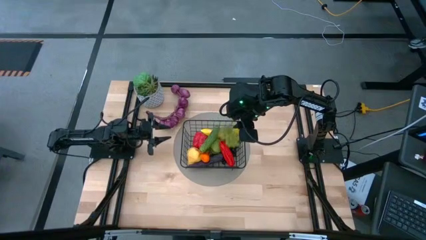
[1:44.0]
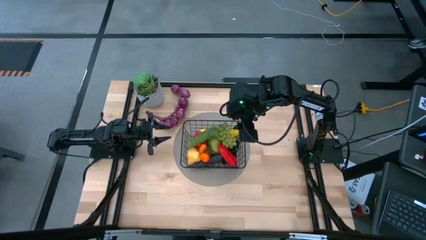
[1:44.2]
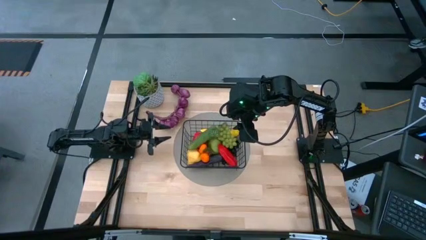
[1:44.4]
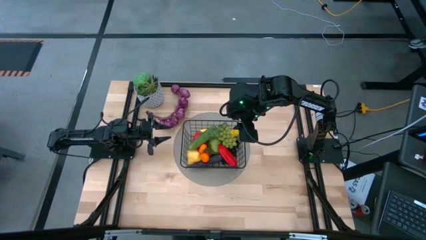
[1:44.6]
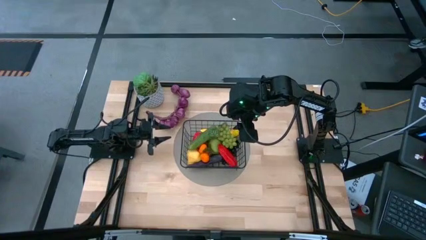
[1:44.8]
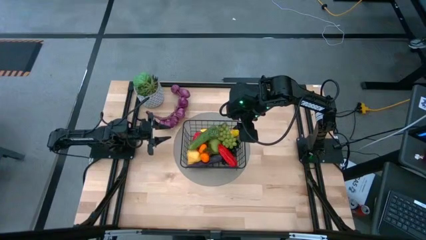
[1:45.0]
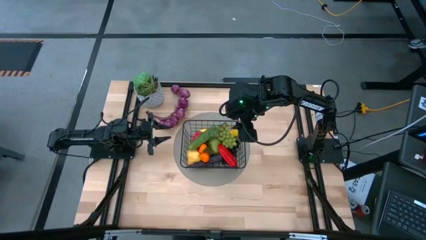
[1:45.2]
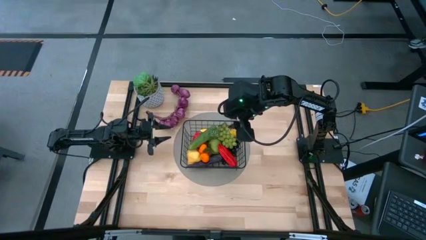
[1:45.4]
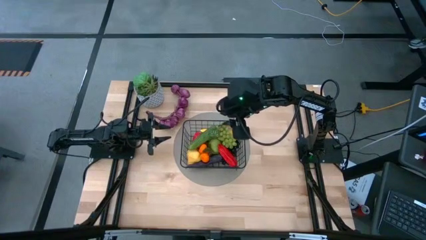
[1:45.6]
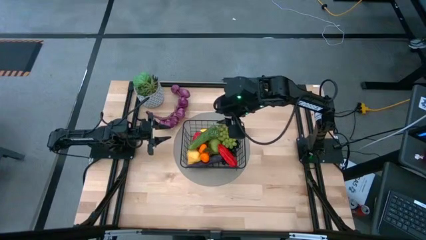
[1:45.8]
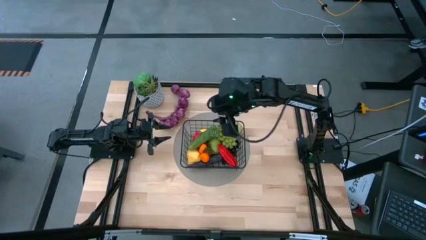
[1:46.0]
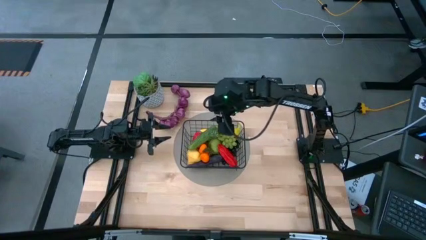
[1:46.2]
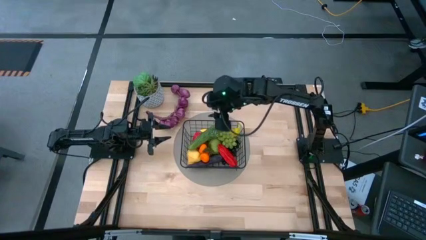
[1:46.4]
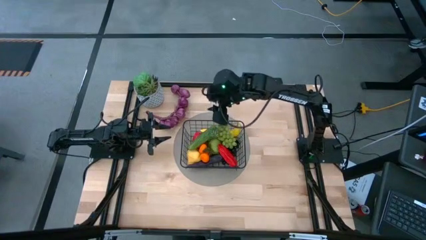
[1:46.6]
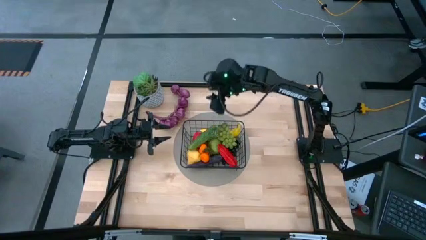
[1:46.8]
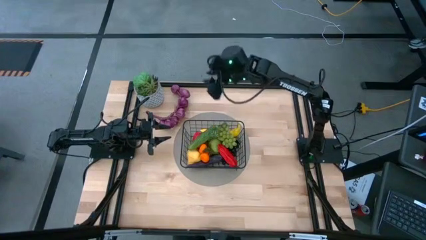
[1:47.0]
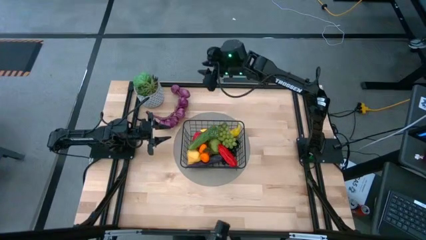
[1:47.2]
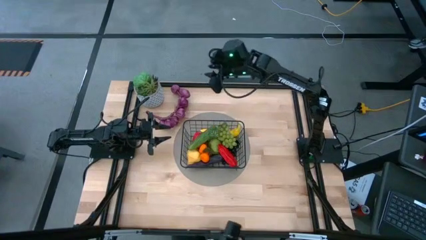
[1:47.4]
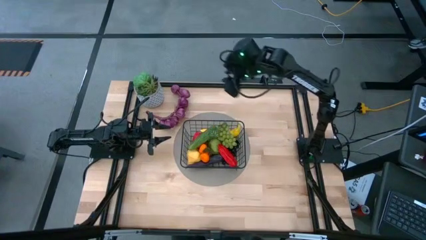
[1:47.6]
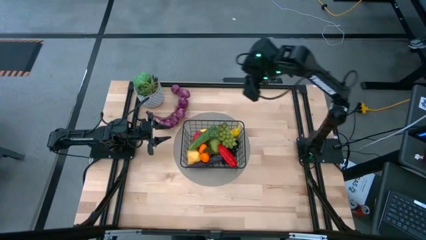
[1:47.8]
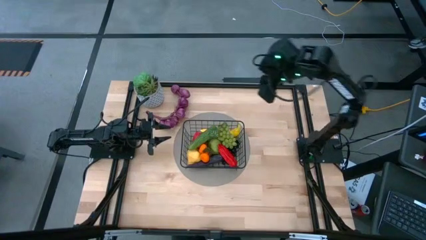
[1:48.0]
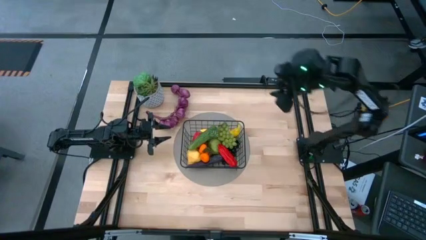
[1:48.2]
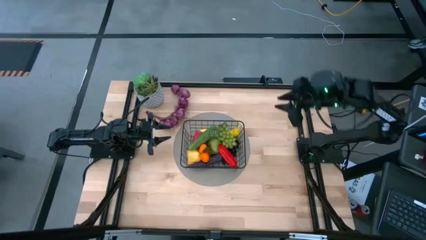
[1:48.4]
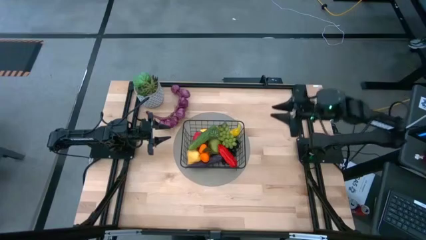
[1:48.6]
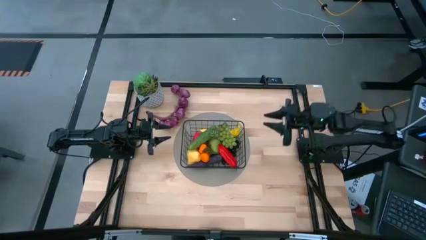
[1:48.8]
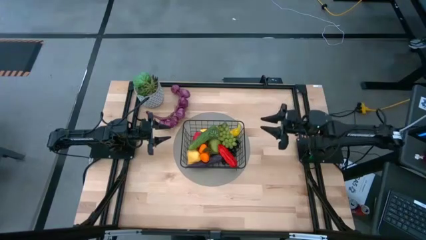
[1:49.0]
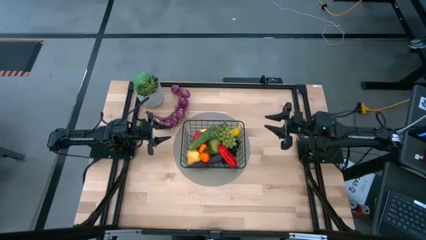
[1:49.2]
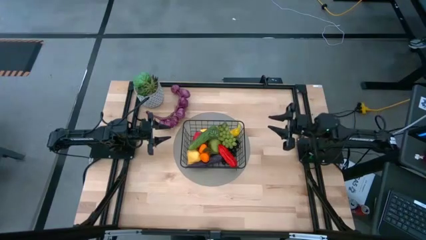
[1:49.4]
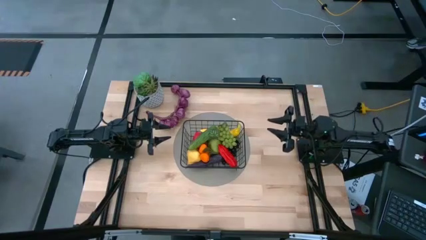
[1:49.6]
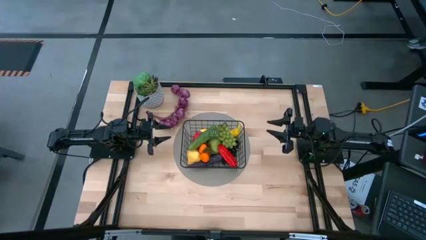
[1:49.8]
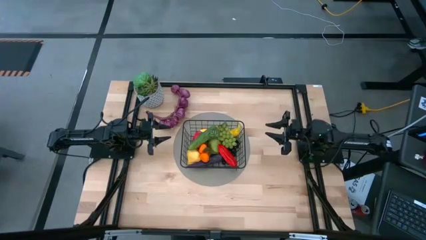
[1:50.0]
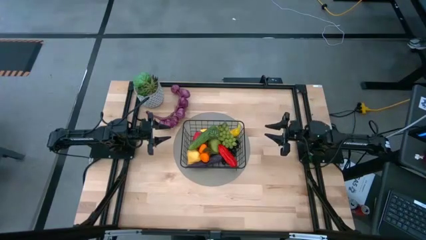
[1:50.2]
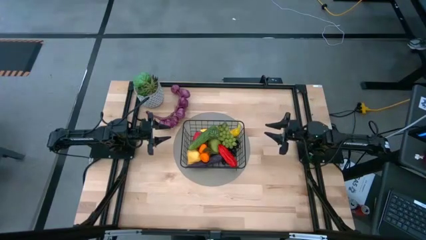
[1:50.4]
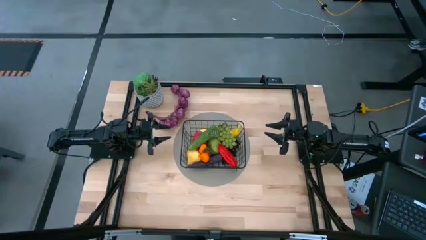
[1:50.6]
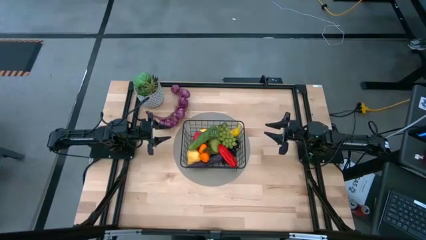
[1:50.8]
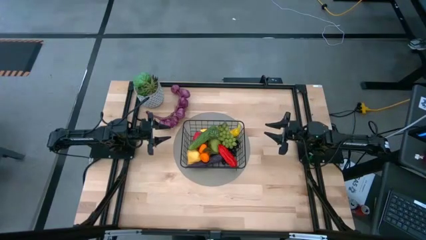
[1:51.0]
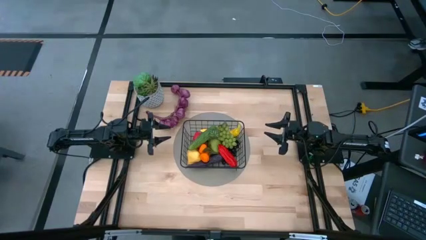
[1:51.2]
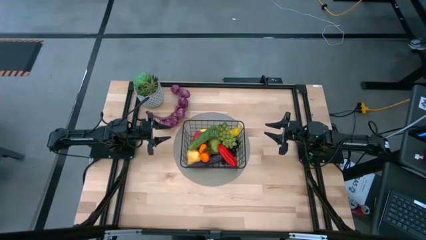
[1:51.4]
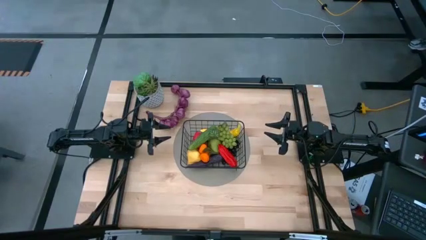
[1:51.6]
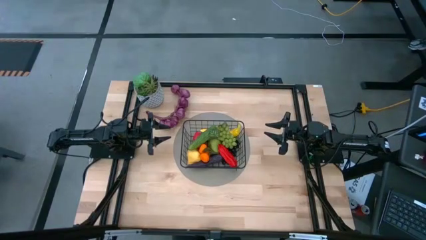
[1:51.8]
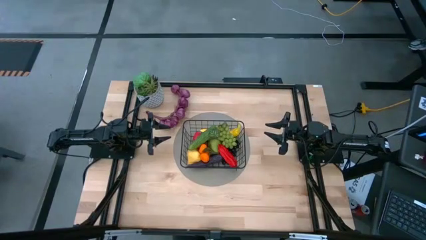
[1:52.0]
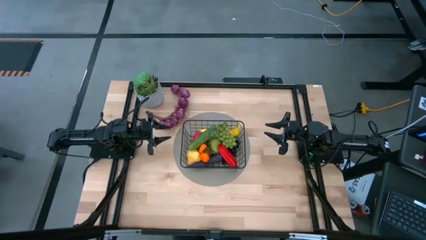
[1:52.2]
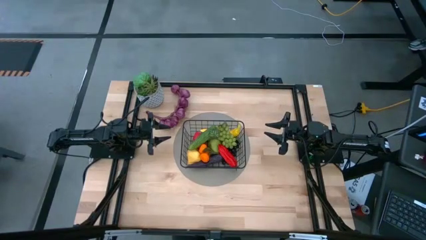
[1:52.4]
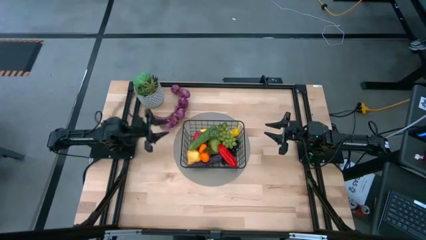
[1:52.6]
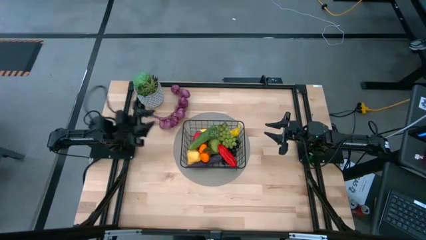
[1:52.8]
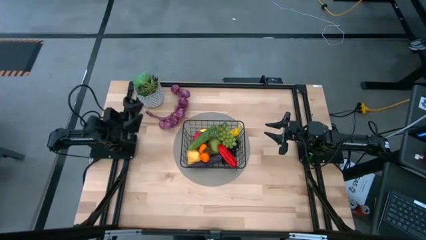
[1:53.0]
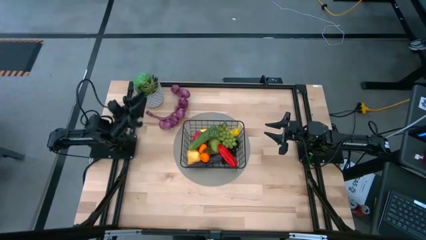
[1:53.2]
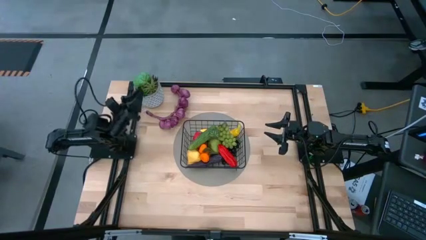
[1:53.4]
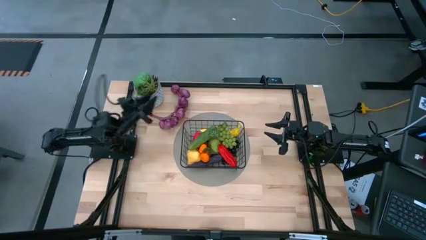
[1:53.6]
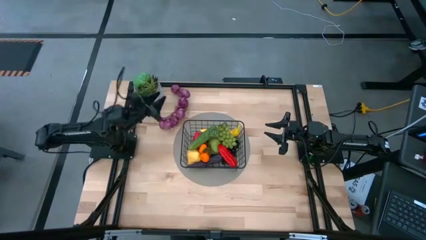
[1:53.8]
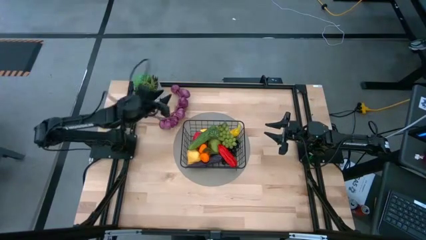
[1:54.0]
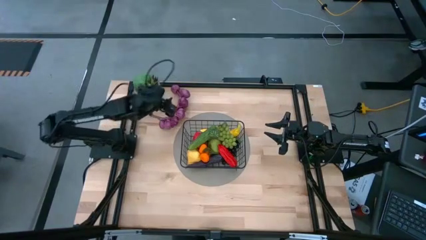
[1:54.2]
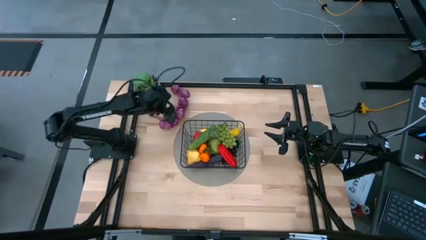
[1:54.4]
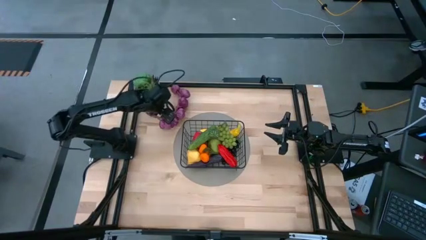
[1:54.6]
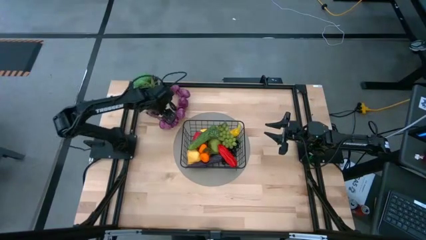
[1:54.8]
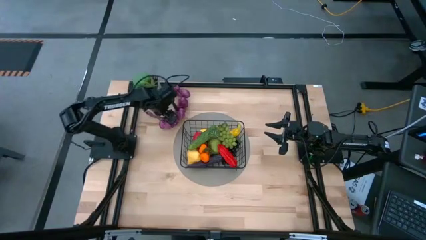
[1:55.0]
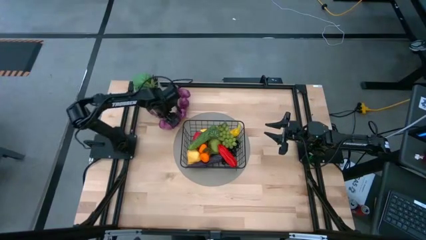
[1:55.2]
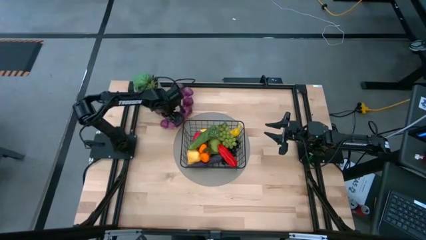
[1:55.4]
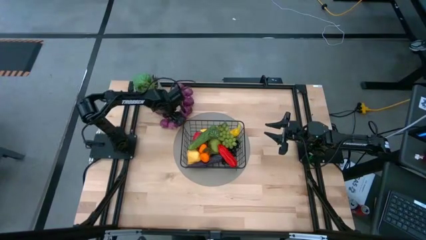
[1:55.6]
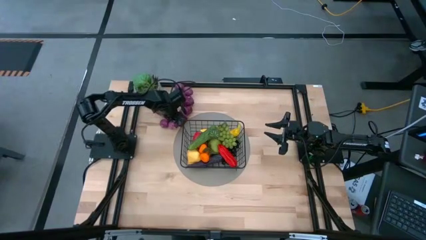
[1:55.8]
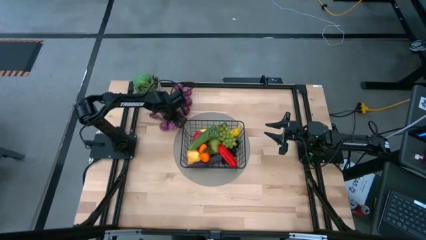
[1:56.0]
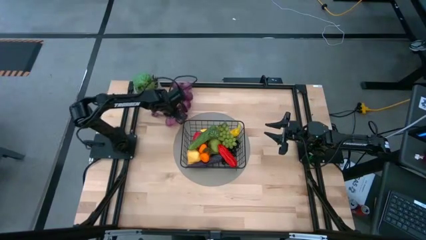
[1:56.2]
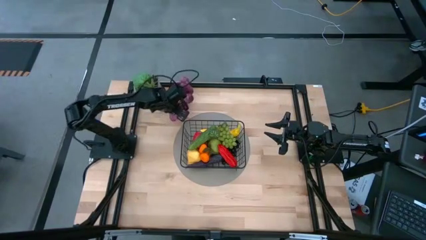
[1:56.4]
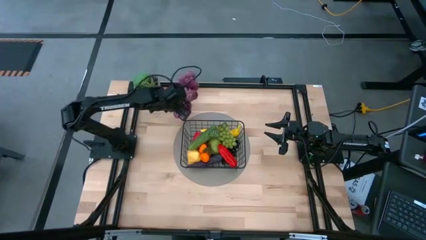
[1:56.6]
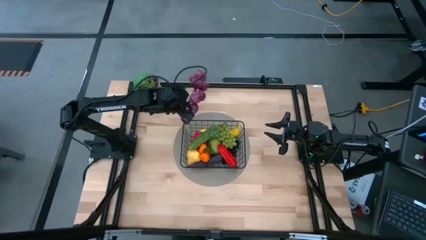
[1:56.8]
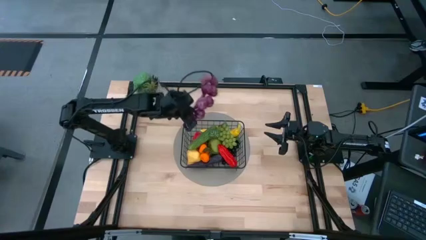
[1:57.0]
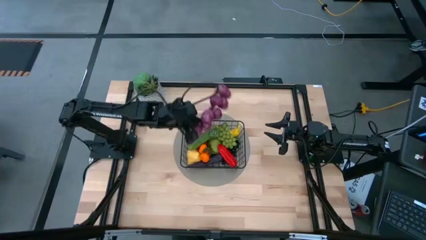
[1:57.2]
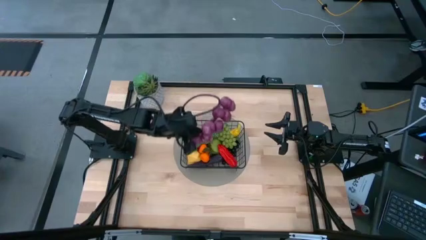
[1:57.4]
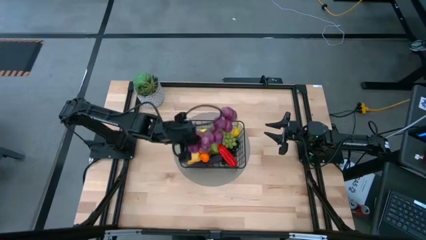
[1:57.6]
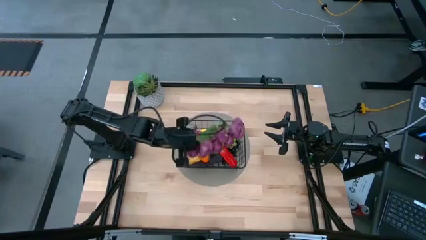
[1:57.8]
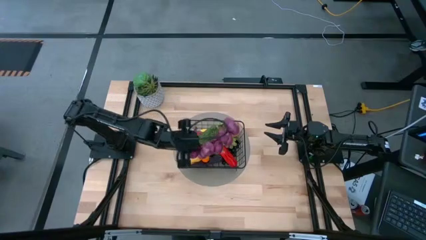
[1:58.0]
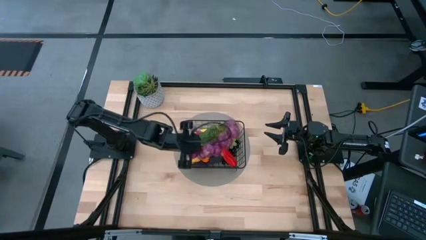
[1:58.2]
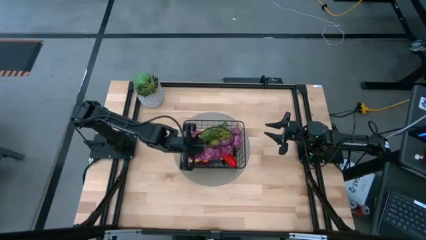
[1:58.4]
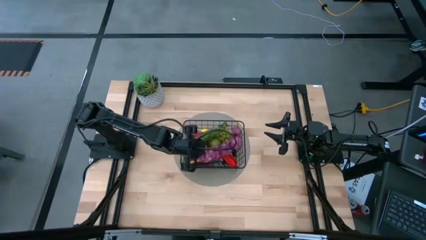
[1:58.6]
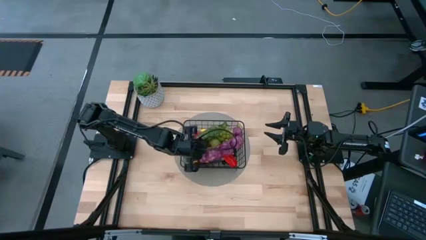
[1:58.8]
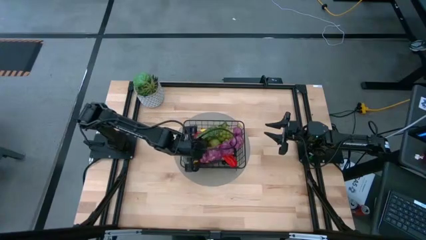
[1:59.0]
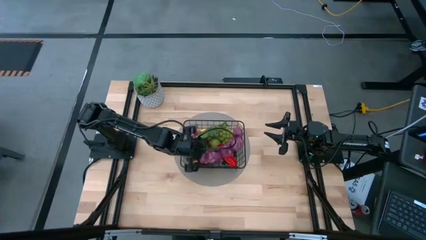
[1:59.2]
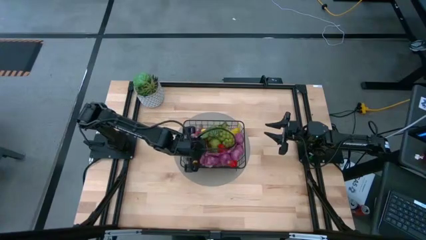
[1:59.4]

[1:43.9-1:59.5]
Task: Build produce basket
Put the purple garlic into the black wire basket
